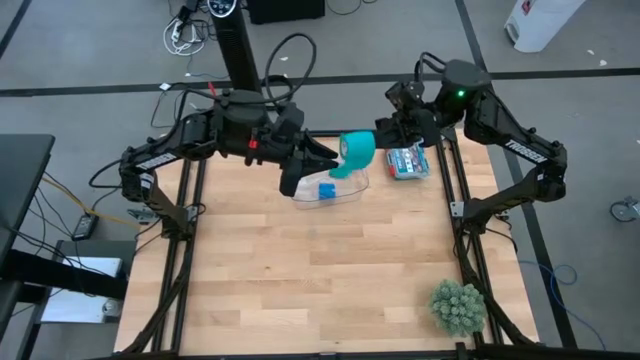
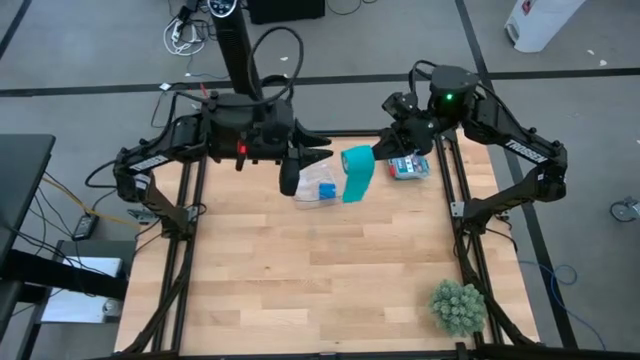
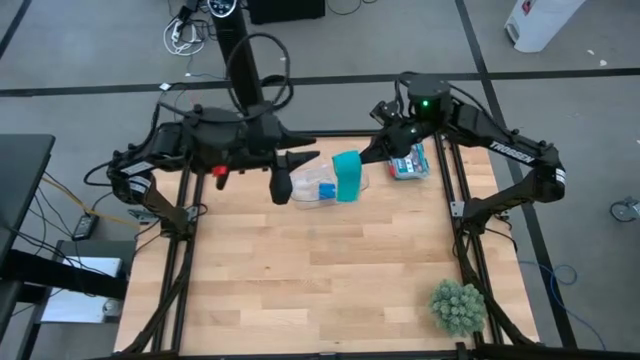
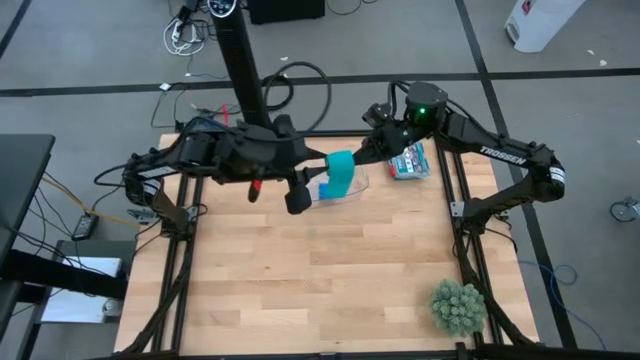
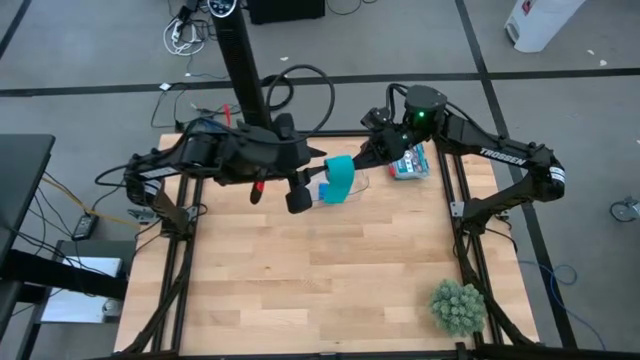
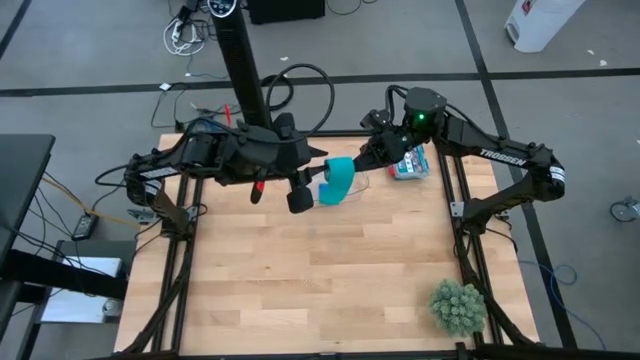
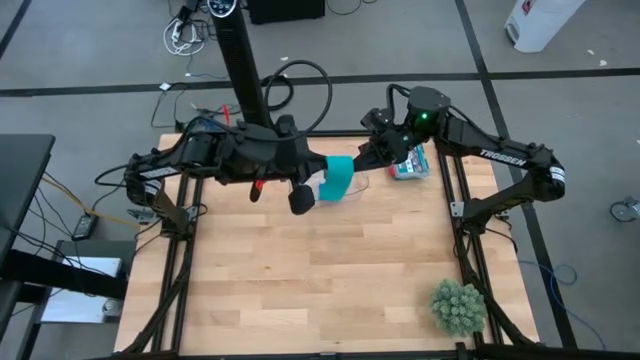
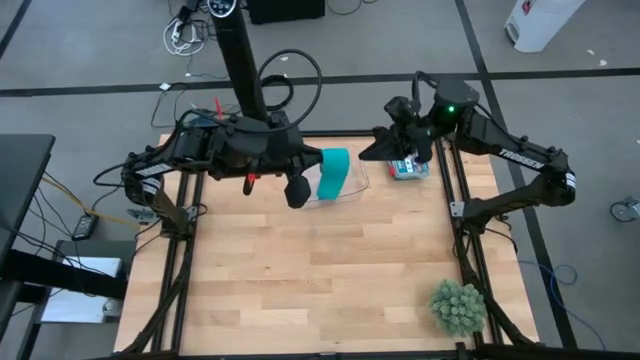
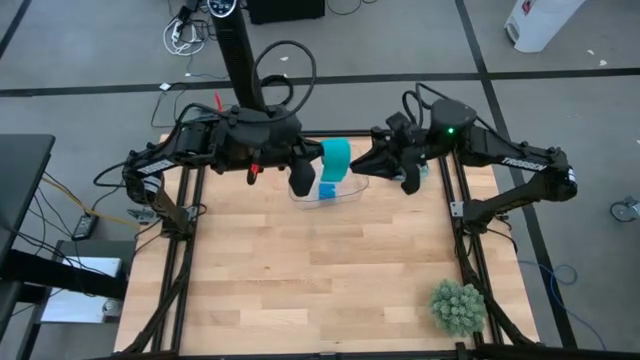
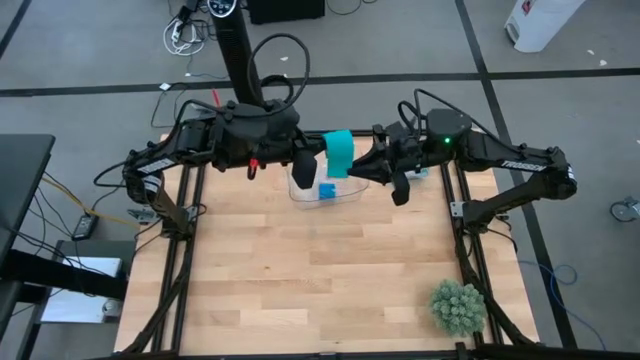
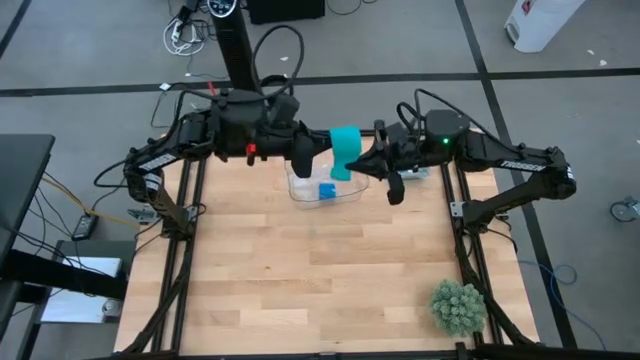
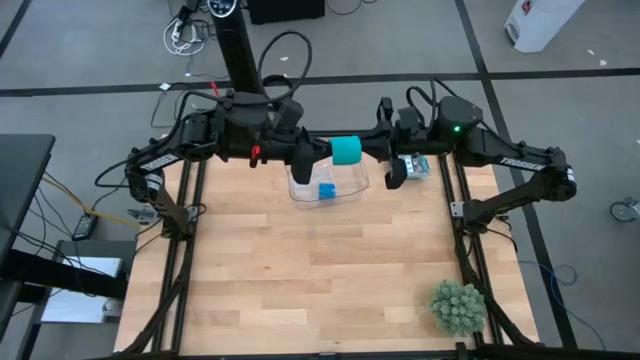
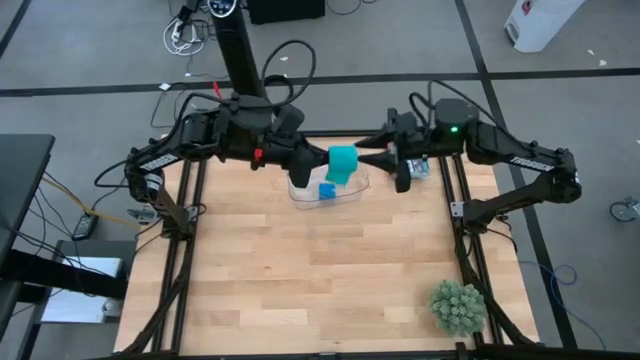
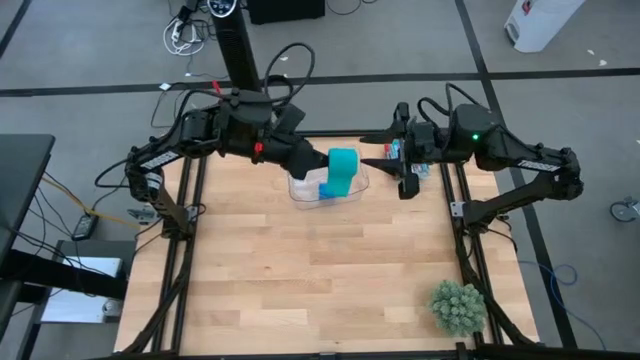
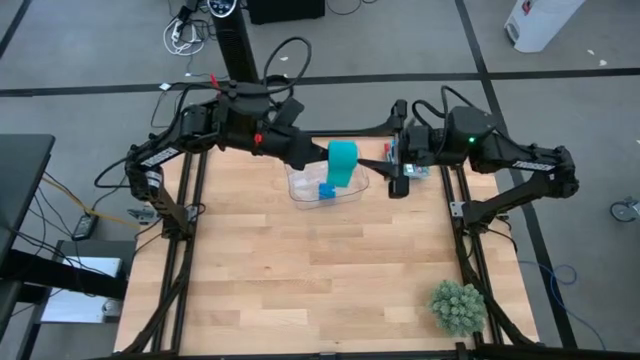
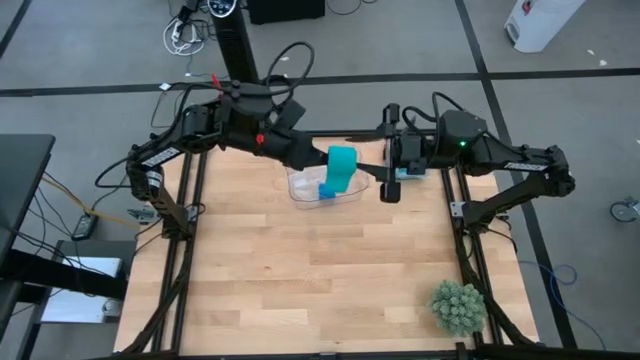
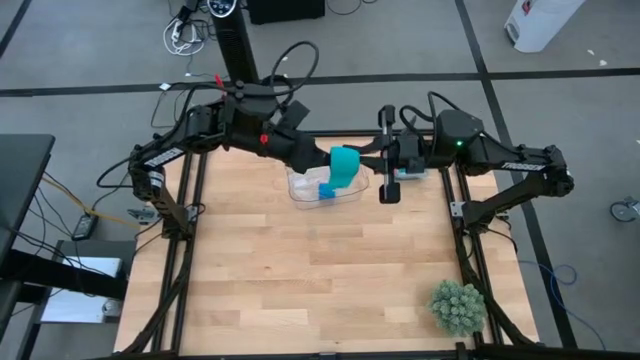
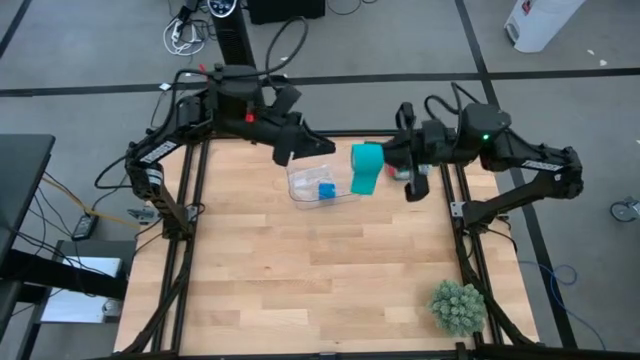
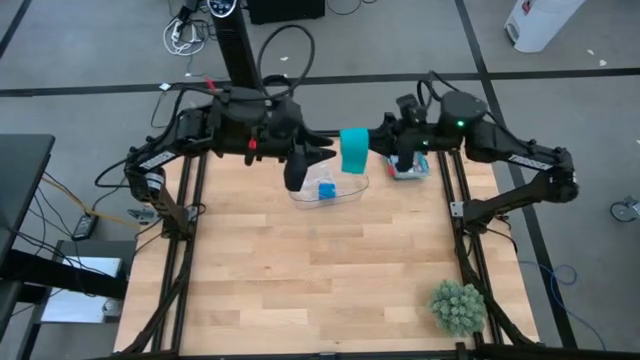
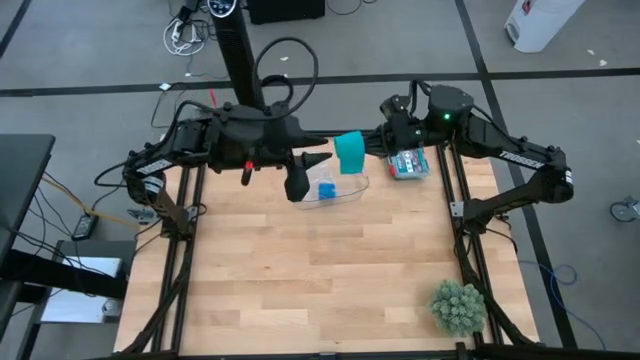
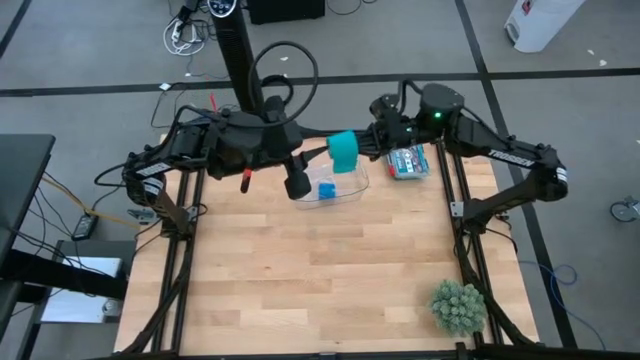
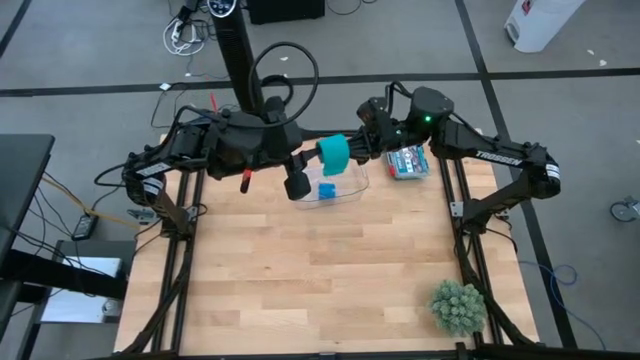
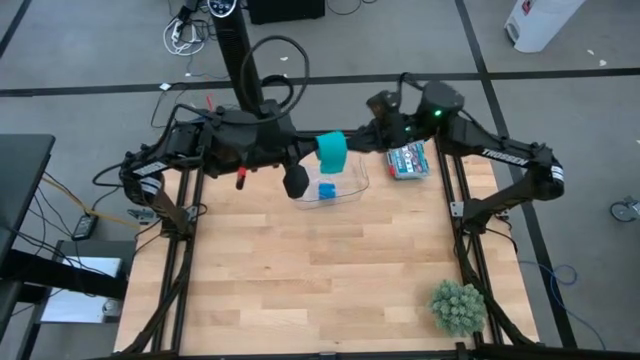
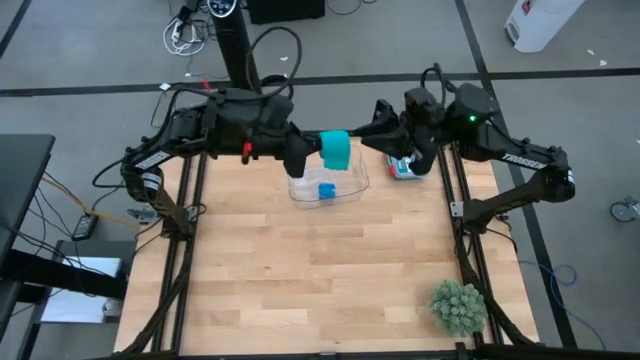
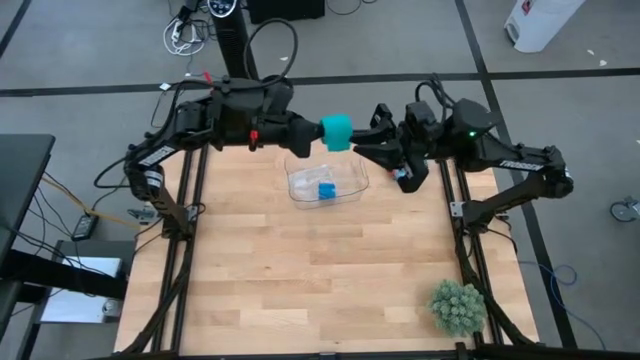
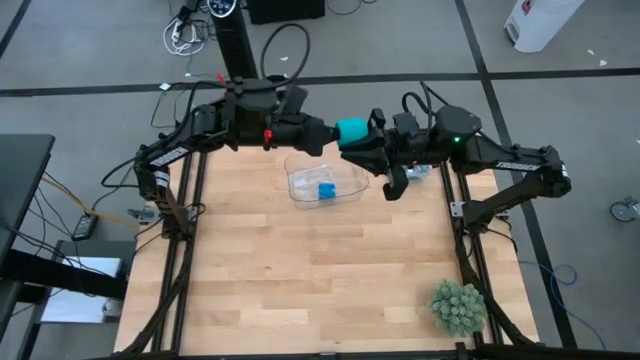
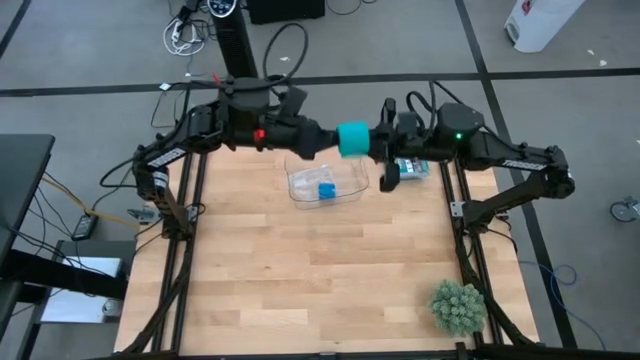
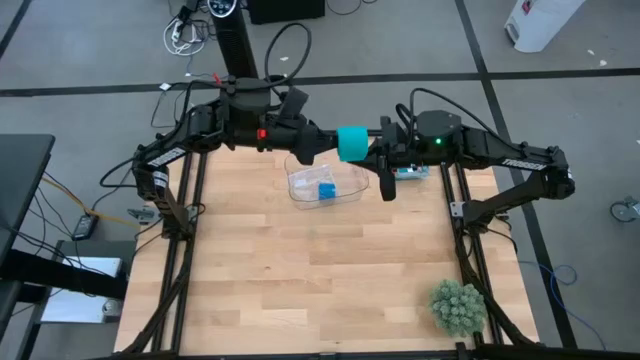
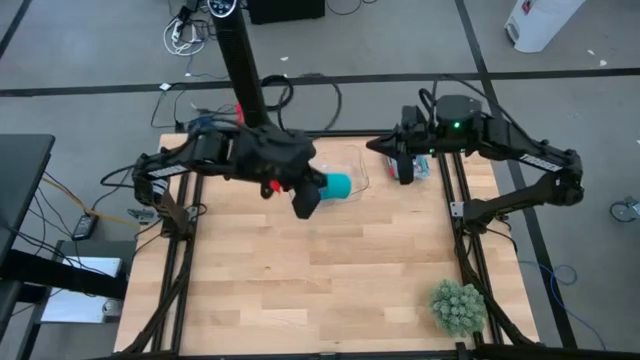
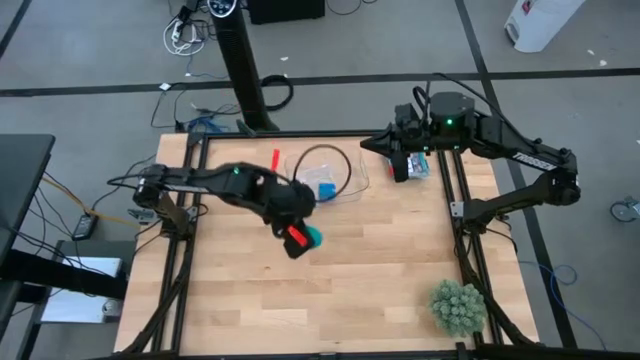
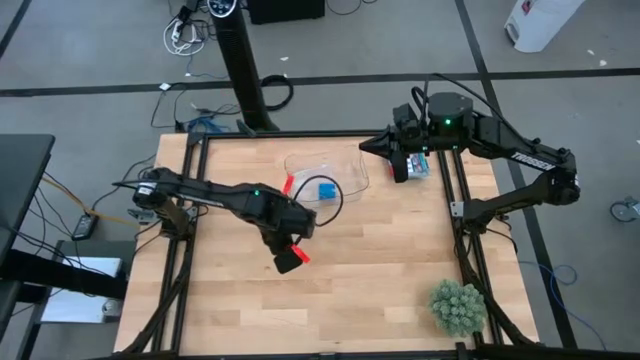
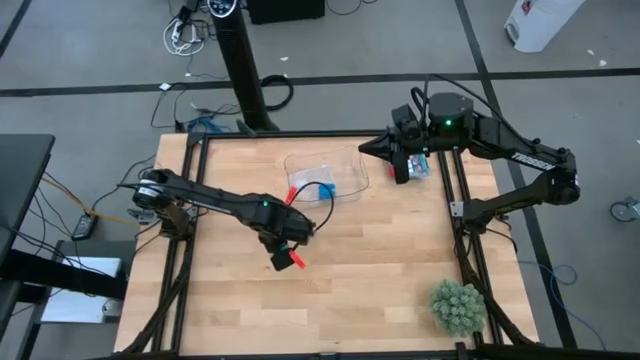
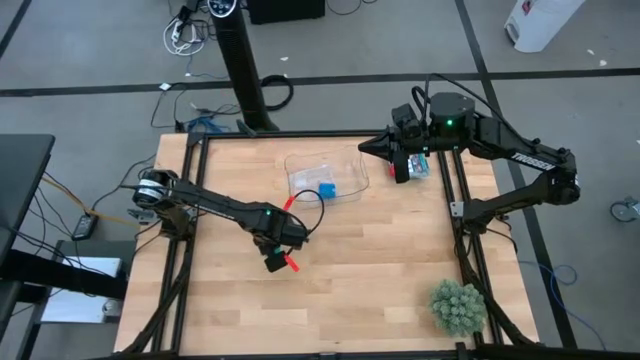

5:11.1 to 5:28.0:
Task: Roll bandage
Roll the sky blue bandage

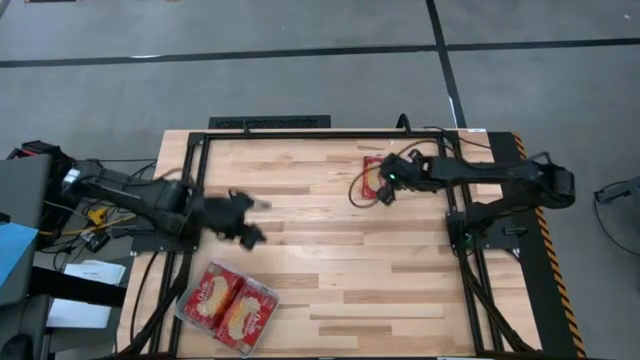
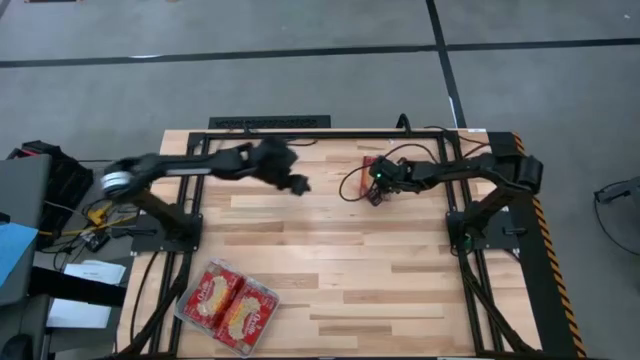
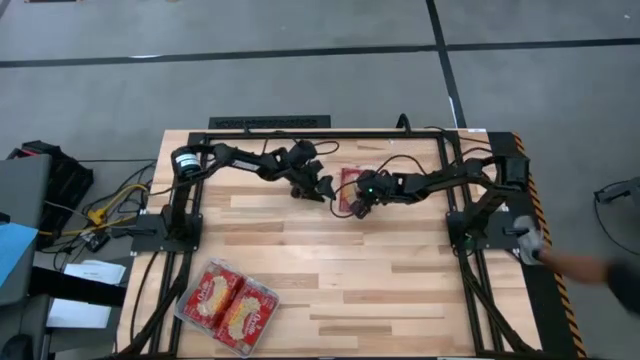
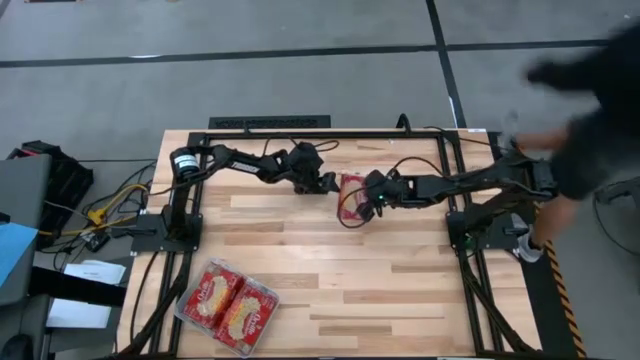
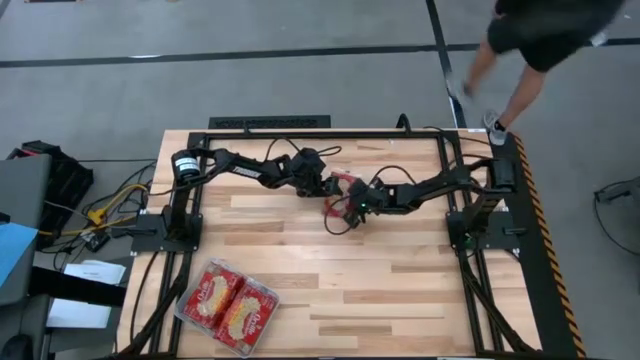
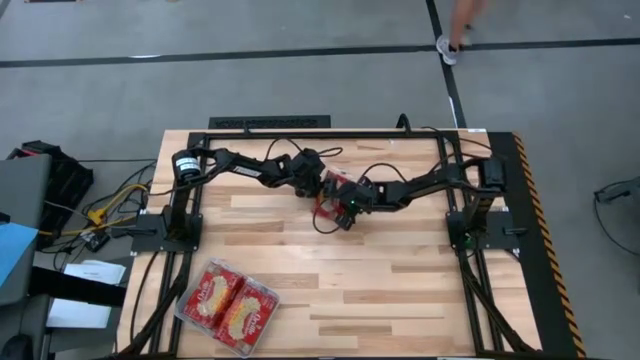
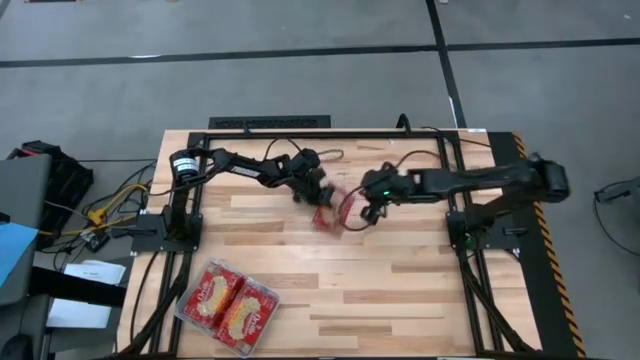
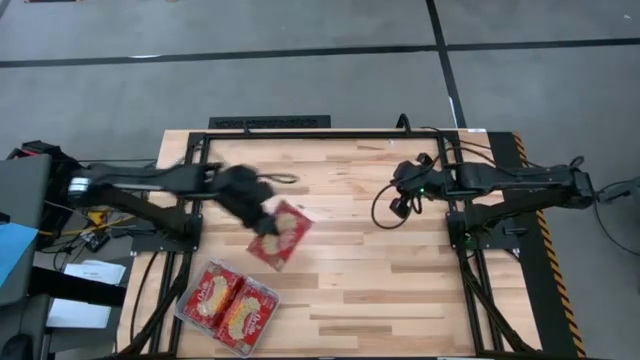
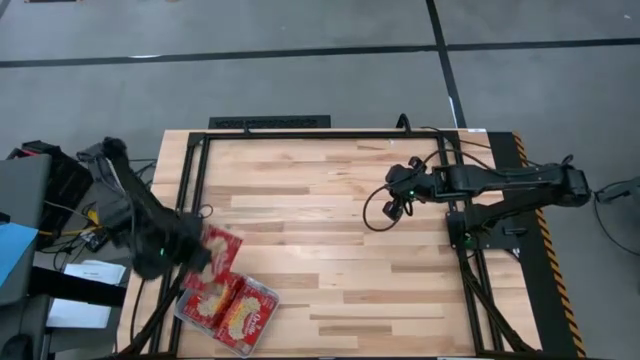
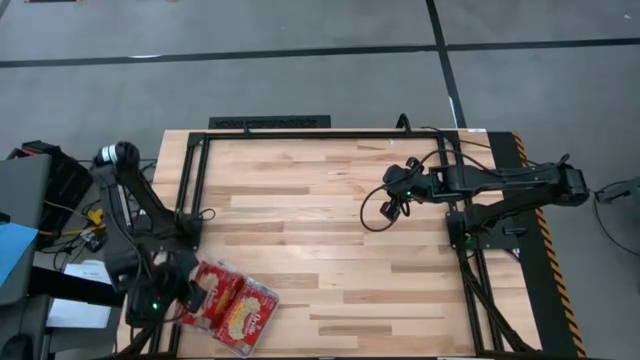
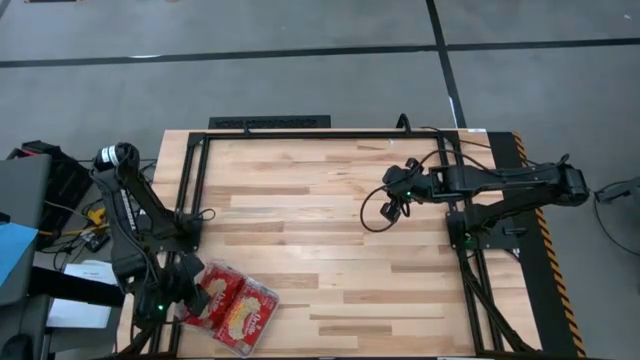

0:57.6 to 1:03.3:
Task: Sort popcorn bags into baskets
Put the red popcorn bag into the transparent bin
